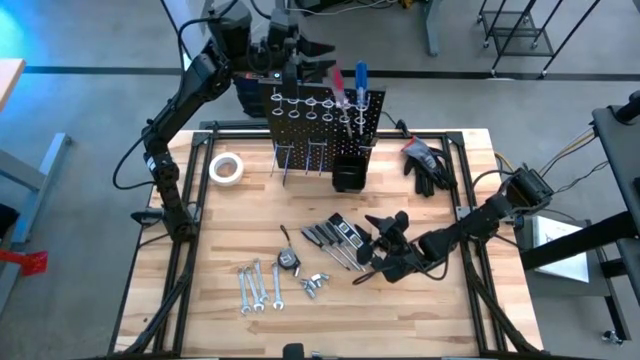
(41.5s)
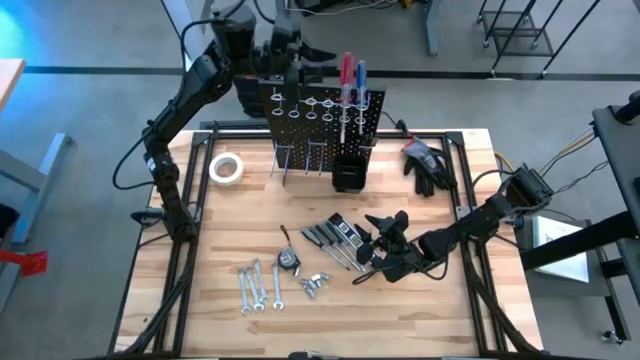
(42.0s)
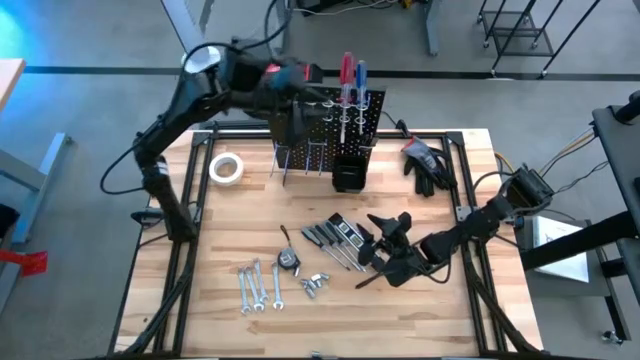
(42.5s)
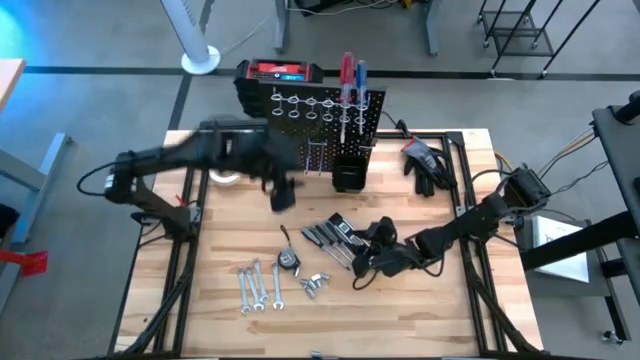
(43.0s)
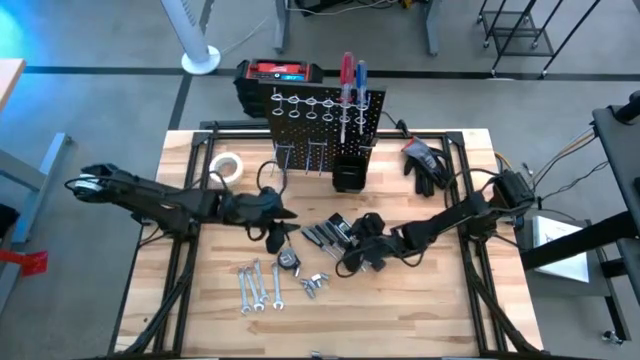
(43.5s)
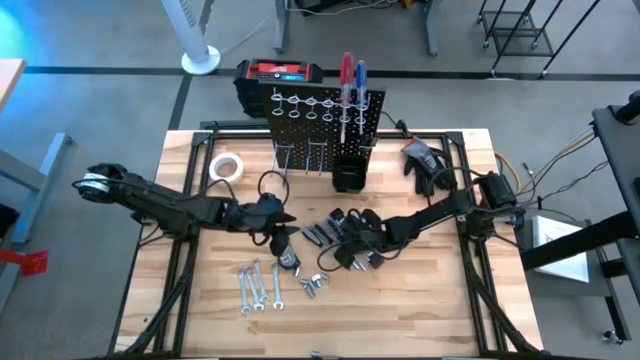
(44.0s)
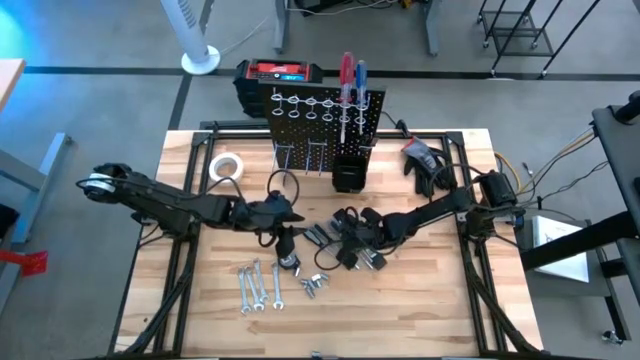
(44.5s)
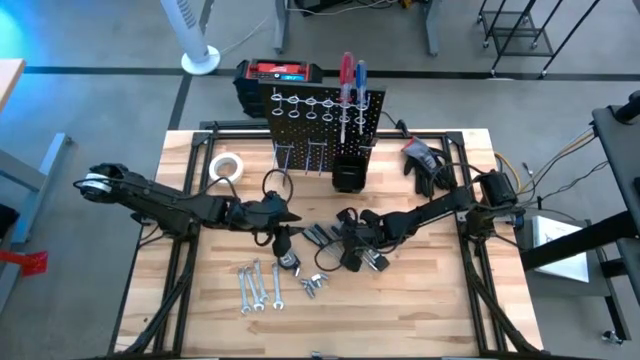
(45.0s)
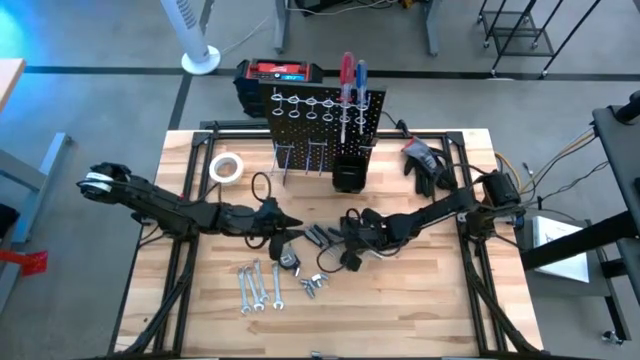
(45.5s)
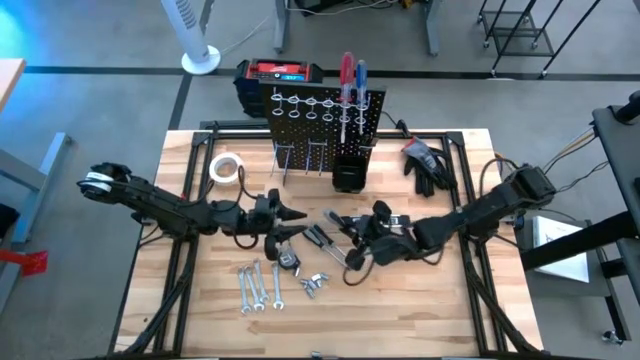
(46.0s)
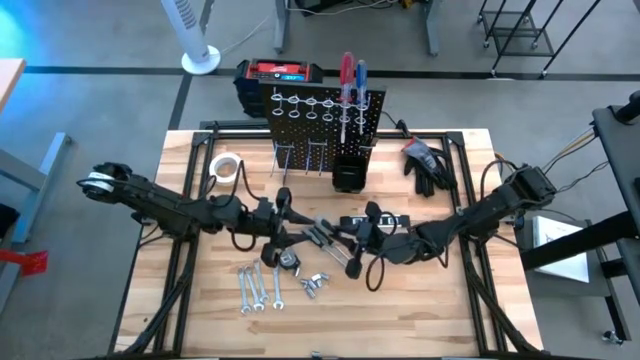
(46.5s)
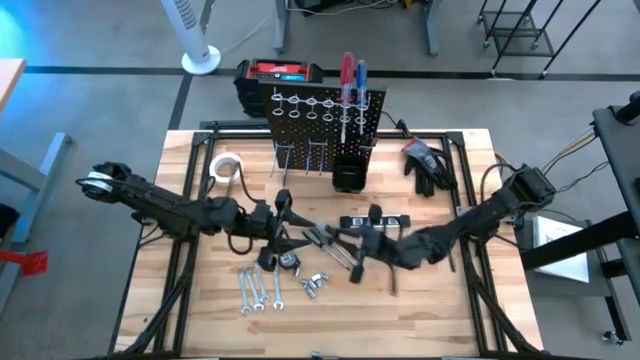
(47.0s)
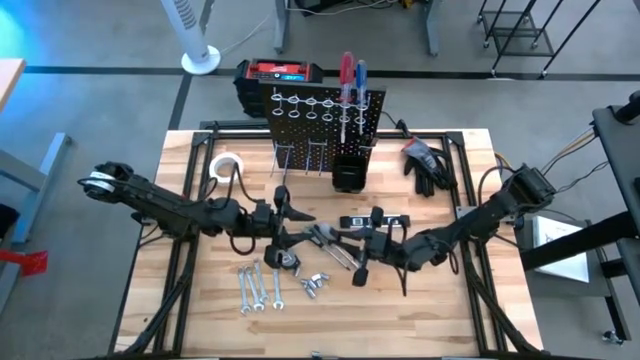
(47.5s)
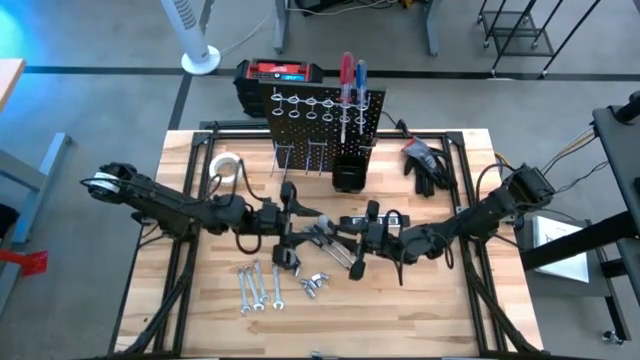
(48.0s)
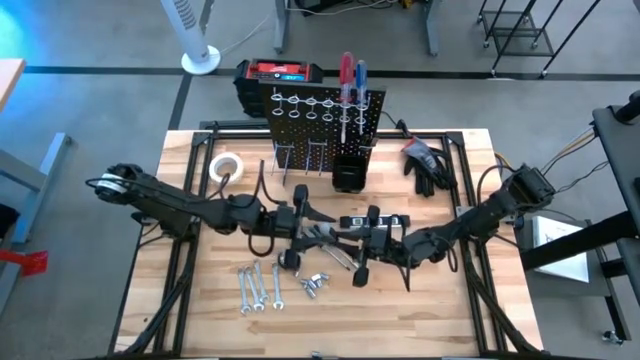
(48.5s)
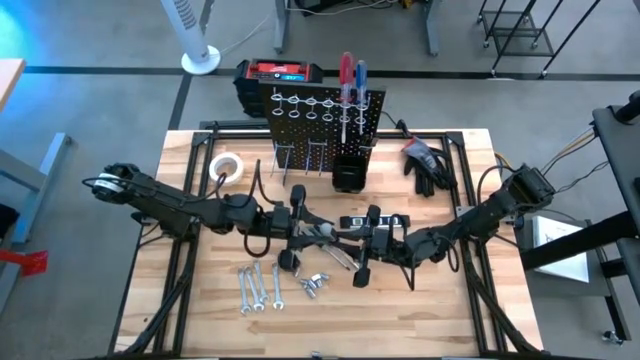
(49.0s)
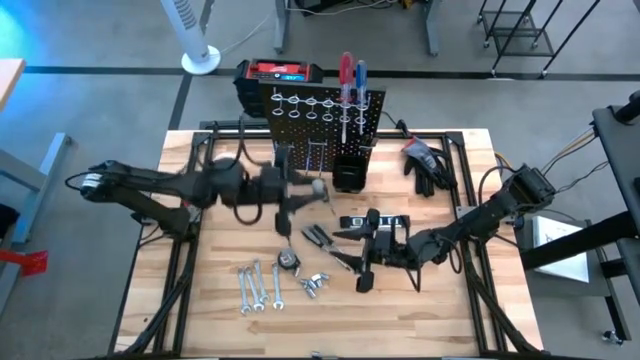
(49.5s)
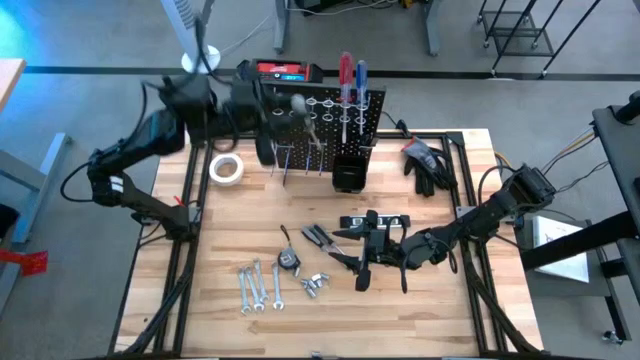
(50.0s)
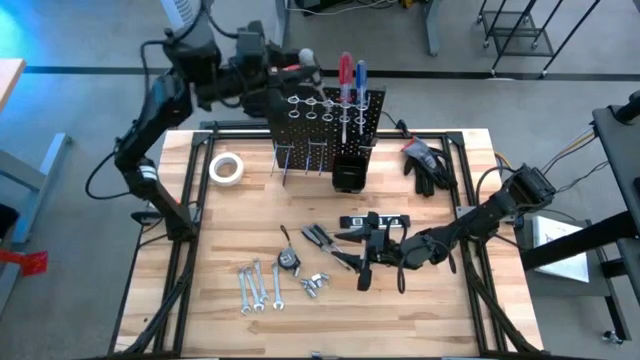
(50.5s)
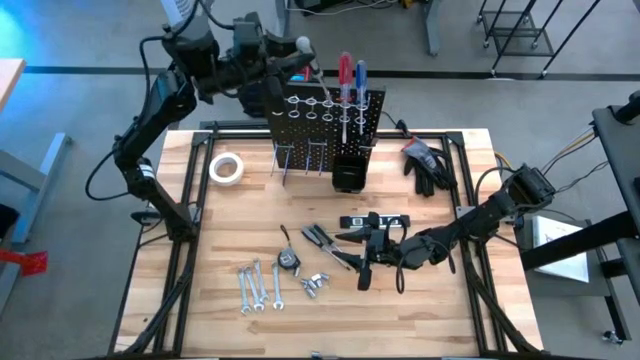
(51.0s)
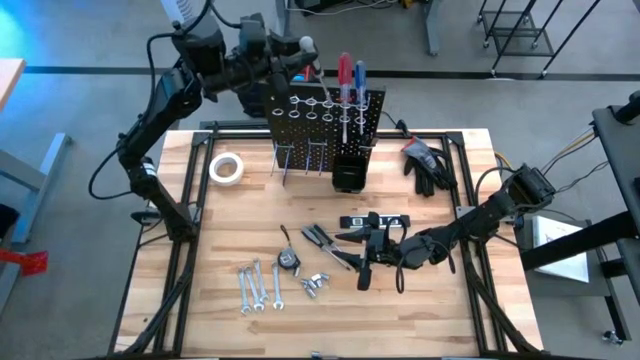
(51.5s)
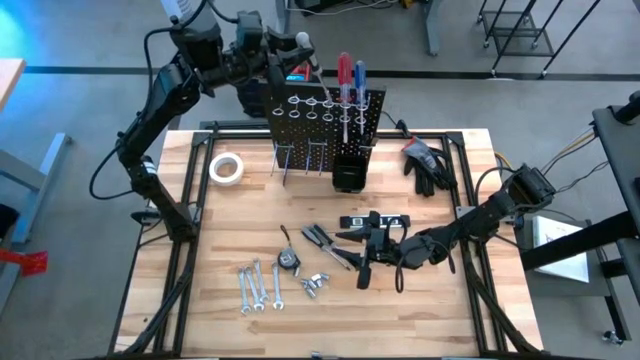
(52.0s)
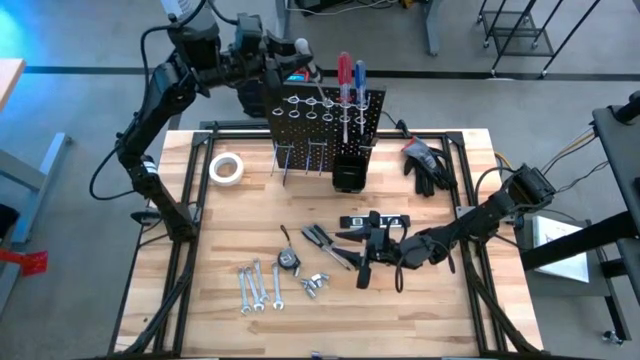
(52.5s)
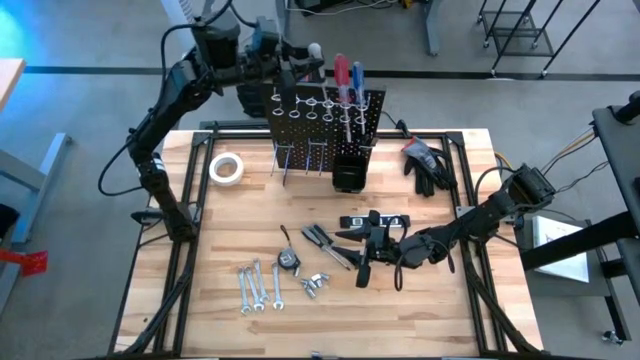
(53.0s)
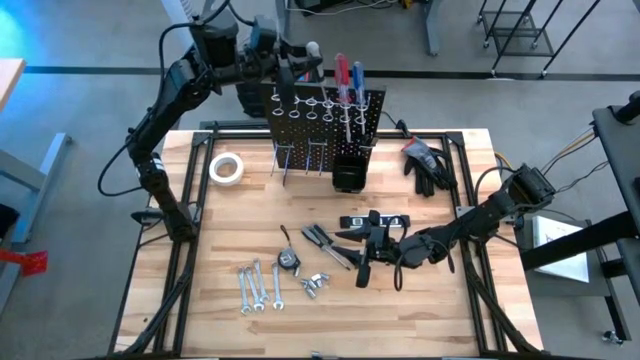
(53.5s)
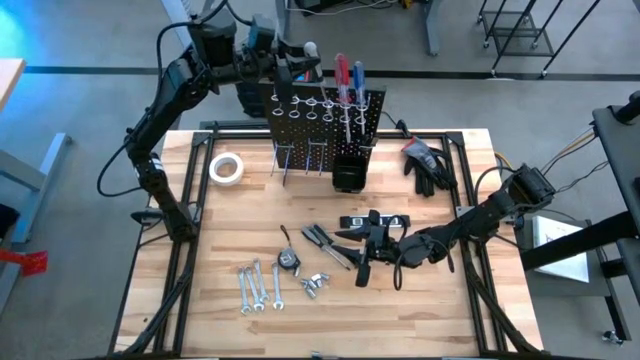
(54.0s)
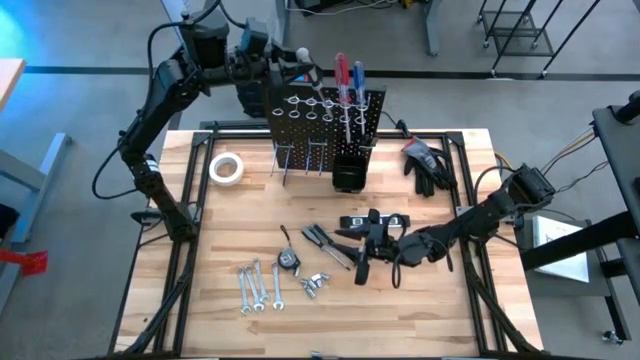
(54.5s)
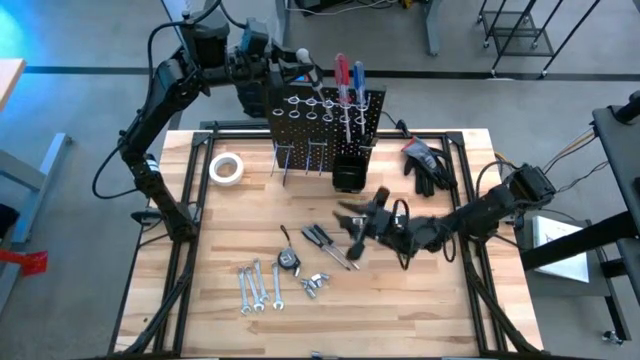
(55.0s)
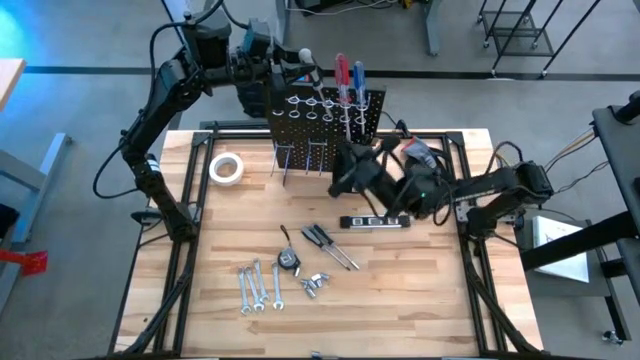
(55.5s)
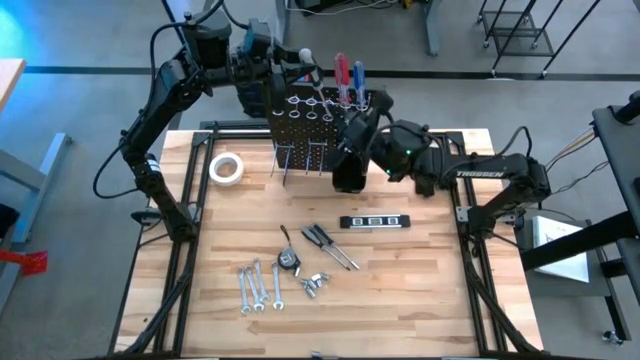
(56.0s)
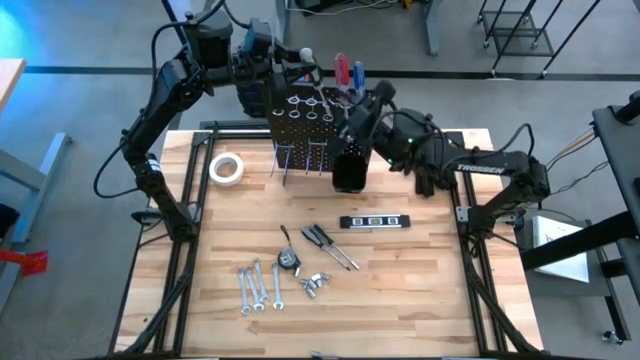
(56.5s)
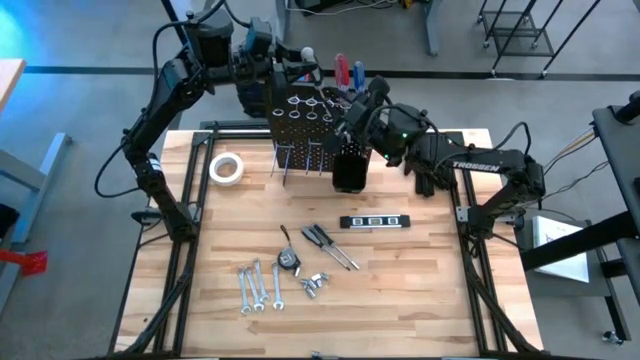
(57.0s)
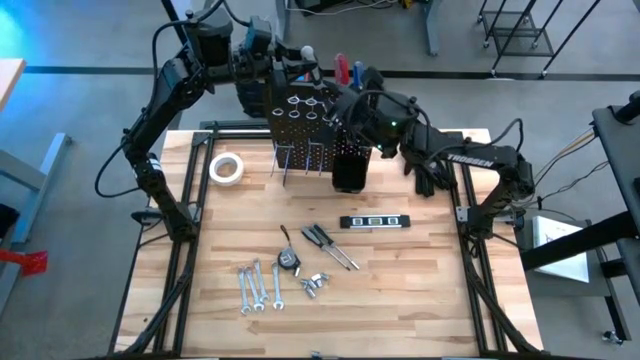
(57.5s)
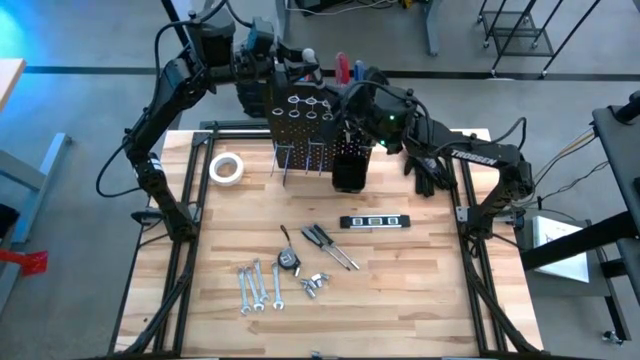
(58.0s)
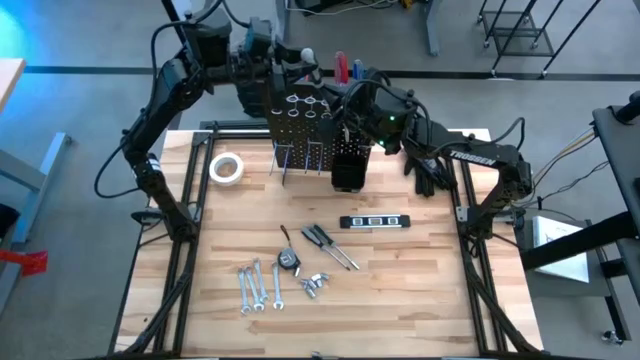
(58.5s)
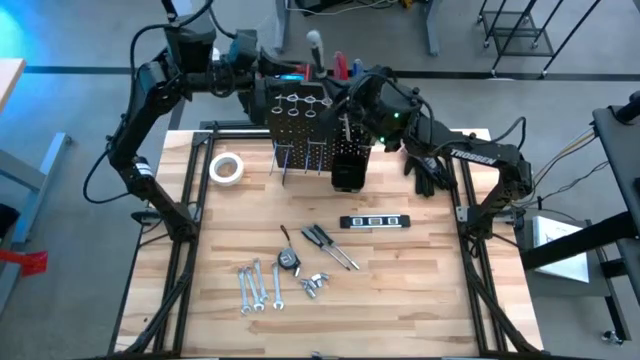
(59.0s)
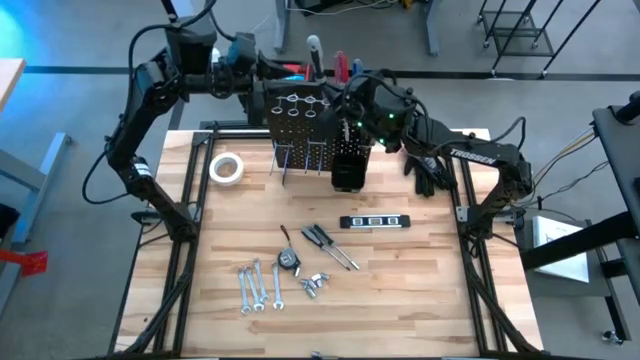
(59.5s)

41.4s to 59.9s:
Task: Hang tools onto peg board
Hang the left bit driver handle on the peg board

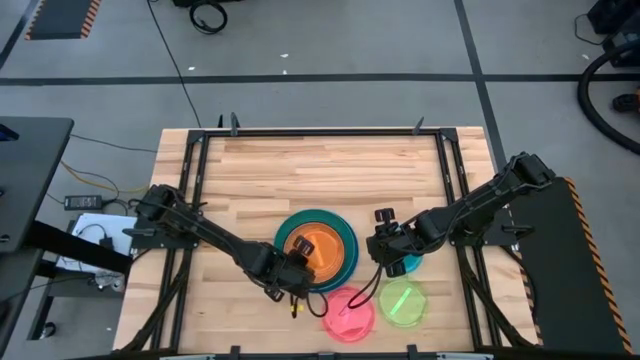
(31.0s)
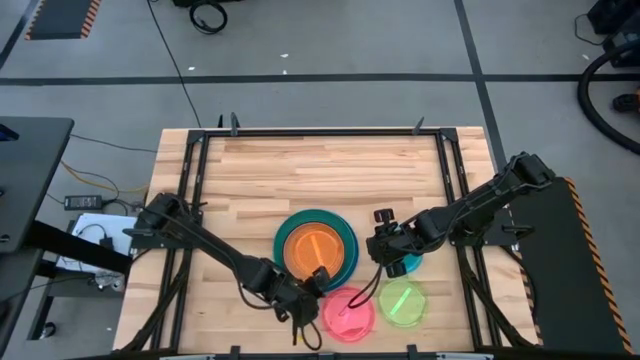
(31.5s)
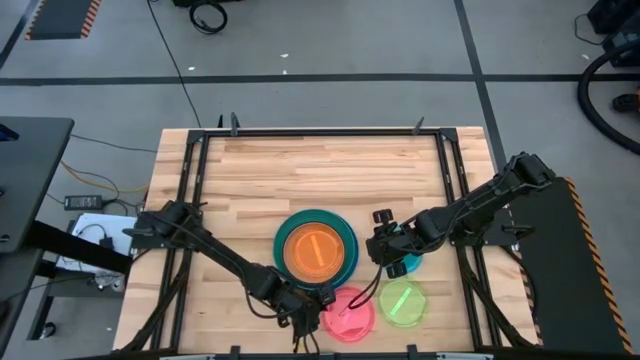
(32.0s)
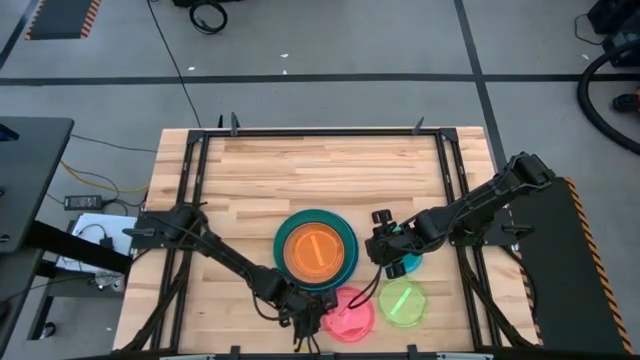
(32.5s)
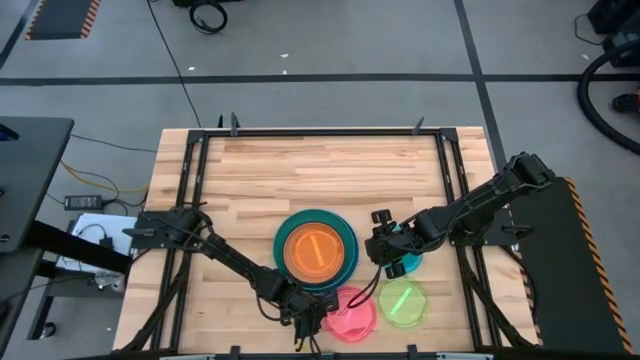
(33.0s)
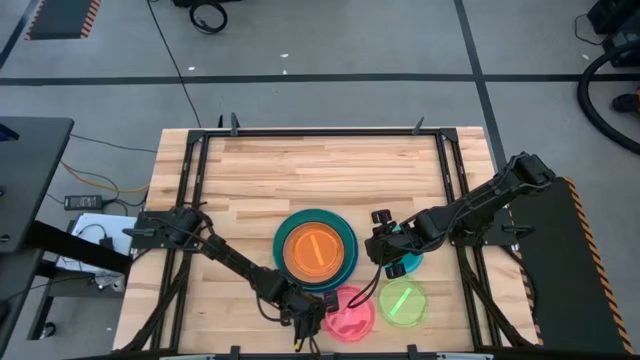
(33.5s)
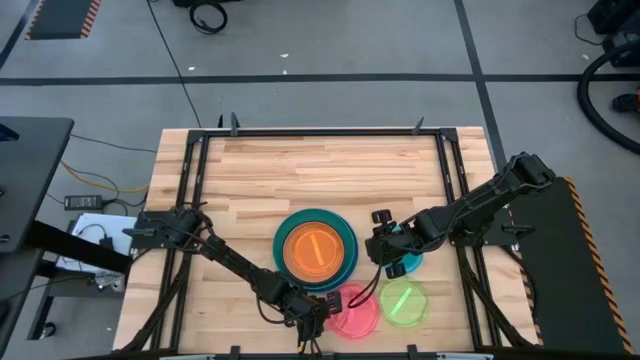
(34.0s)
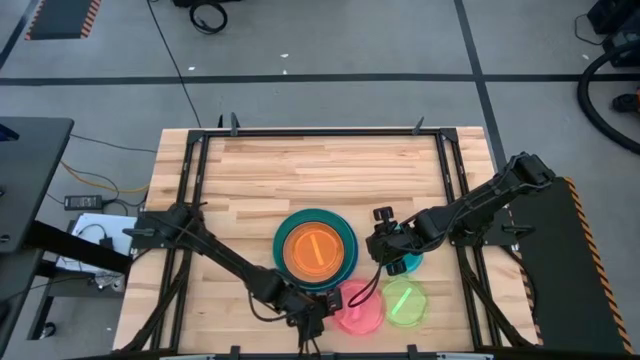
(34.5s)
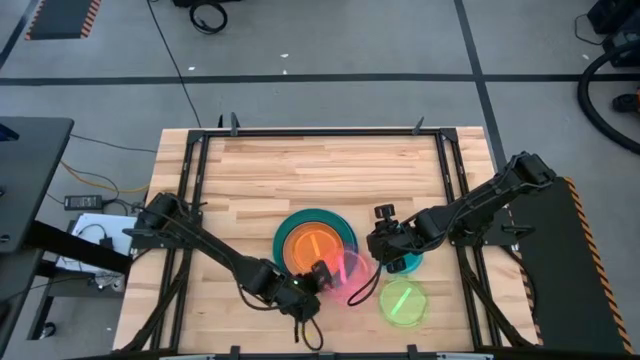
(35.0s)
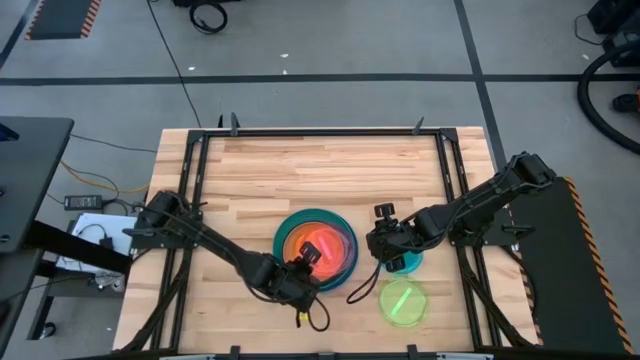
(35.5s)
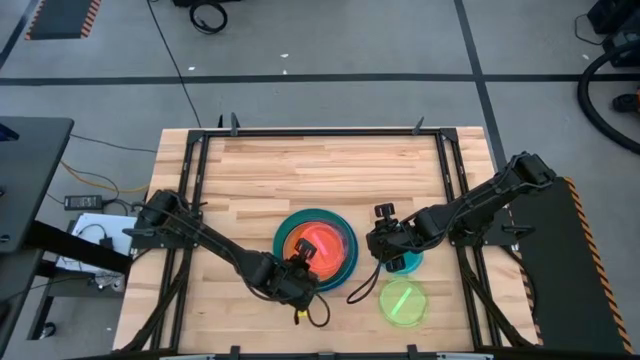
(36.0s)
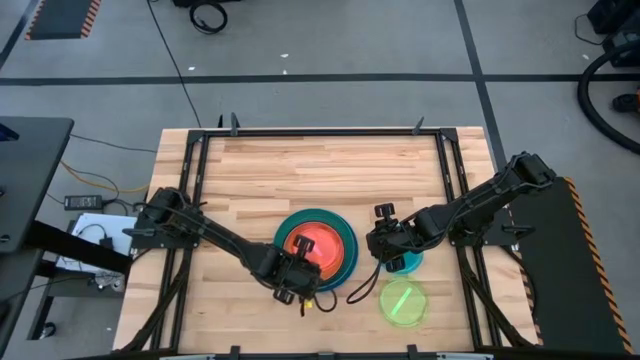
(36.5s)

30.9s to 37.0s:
Task: Stack plastic plates
Stack the pink transparent plate on top of the orange transparent plate
